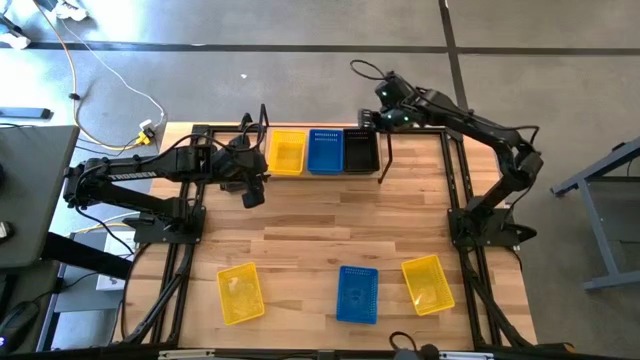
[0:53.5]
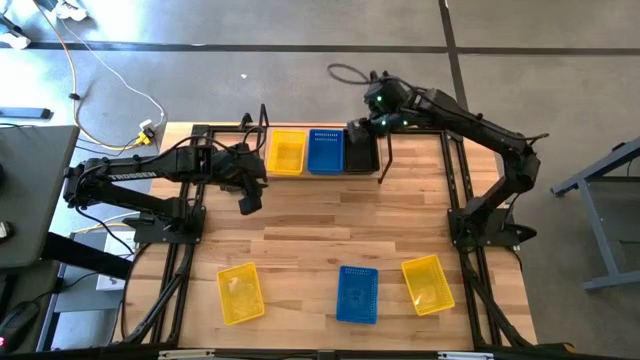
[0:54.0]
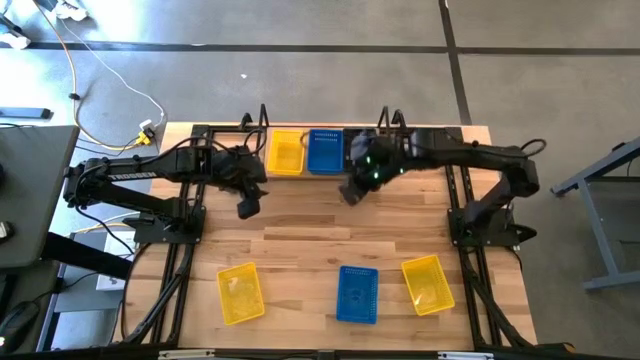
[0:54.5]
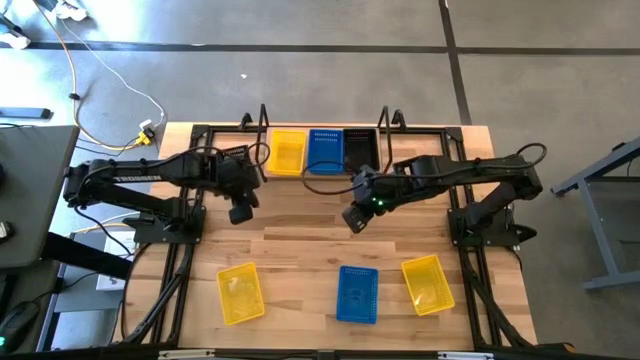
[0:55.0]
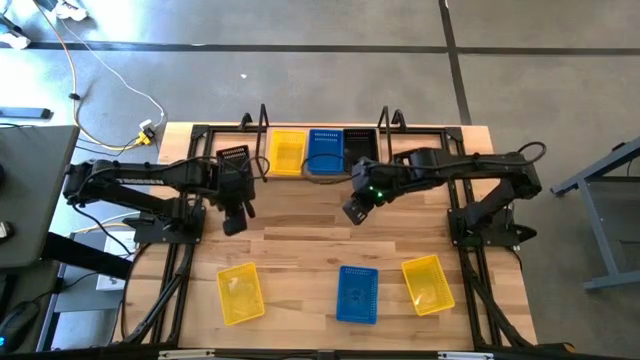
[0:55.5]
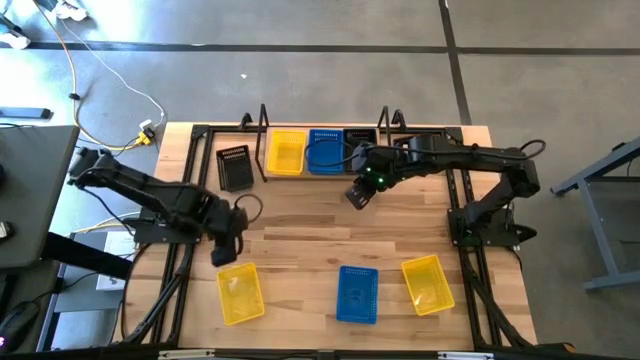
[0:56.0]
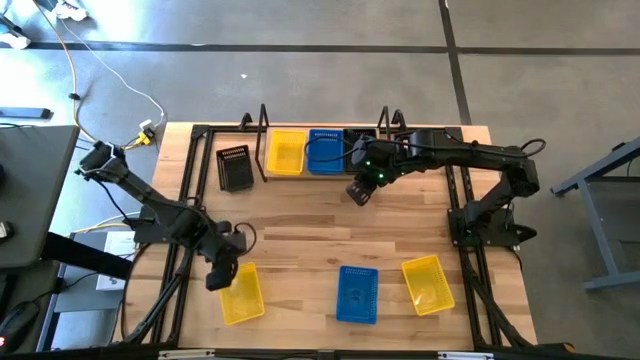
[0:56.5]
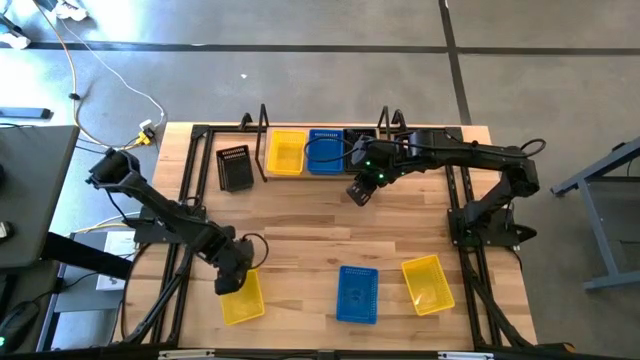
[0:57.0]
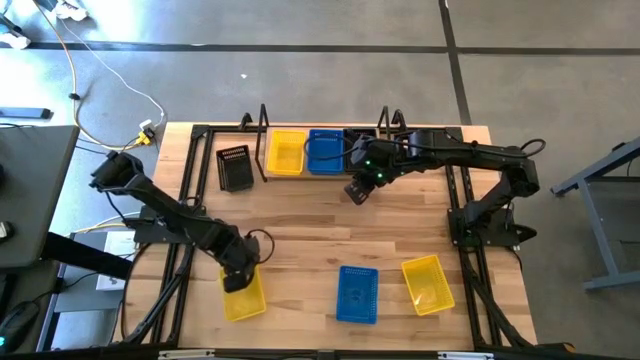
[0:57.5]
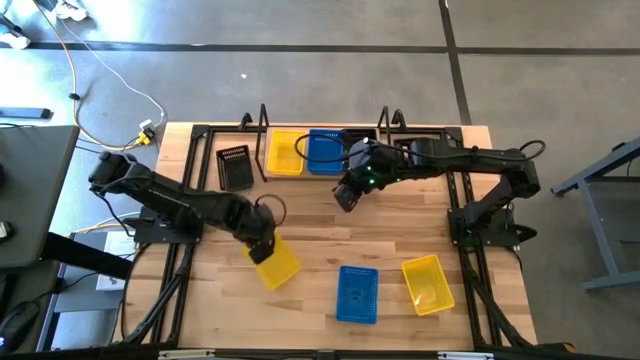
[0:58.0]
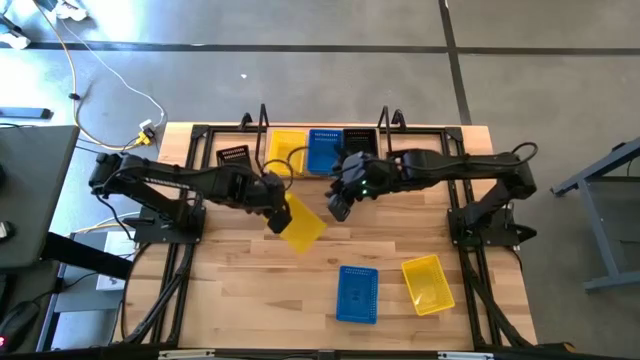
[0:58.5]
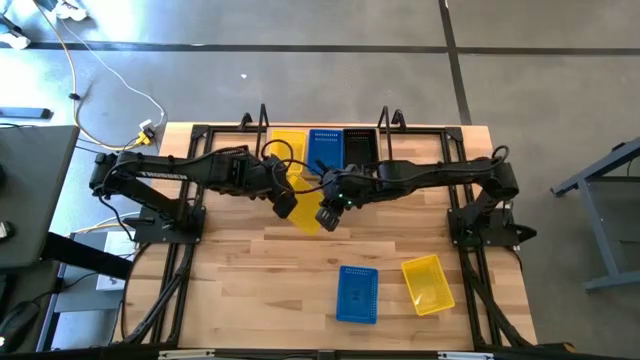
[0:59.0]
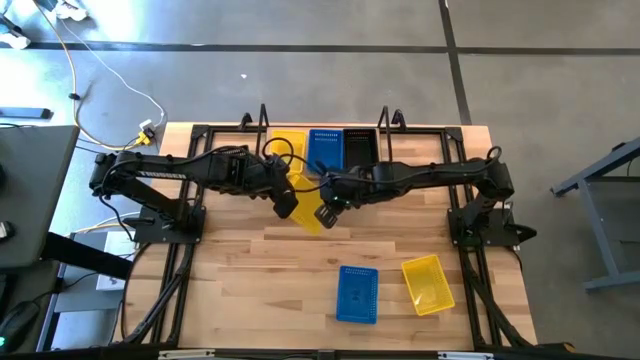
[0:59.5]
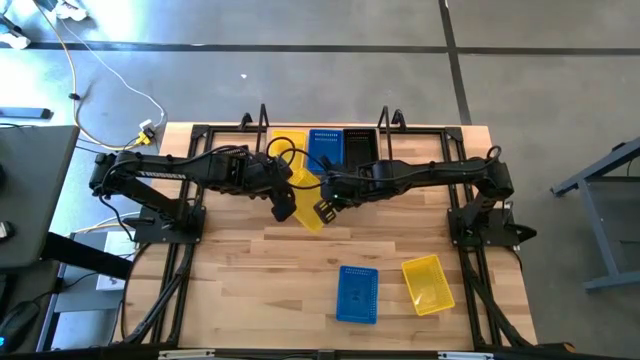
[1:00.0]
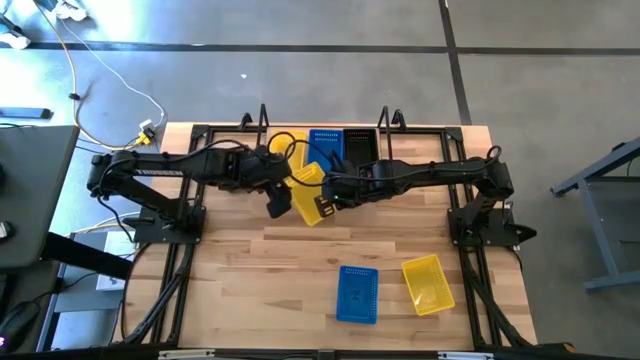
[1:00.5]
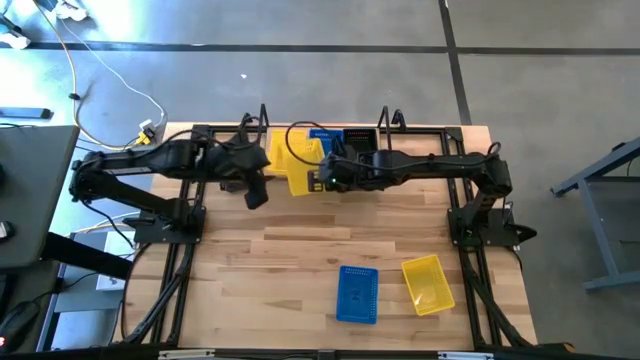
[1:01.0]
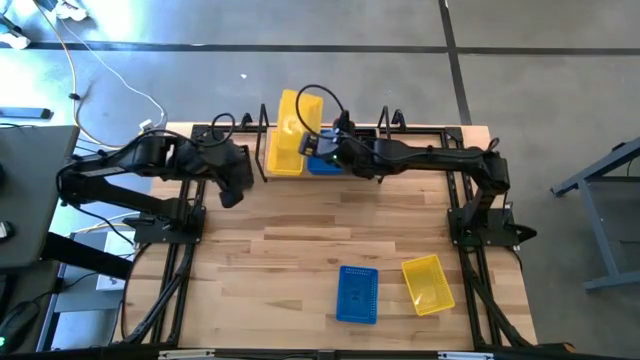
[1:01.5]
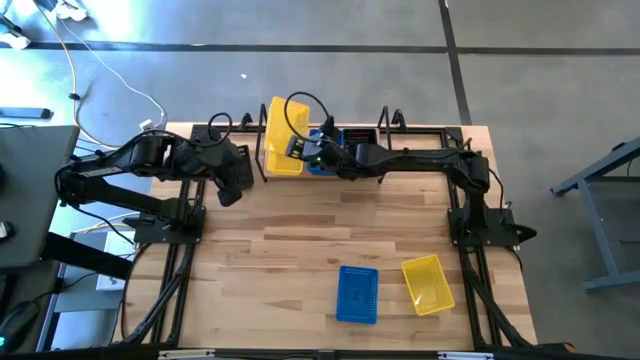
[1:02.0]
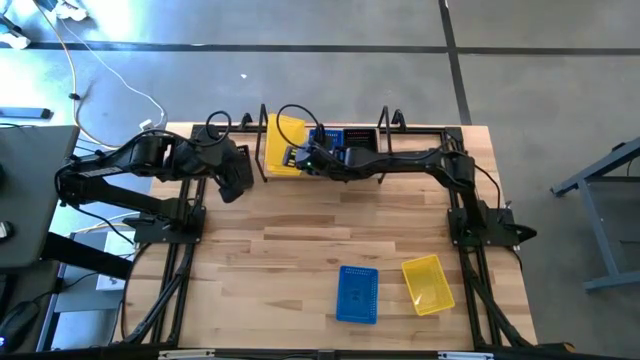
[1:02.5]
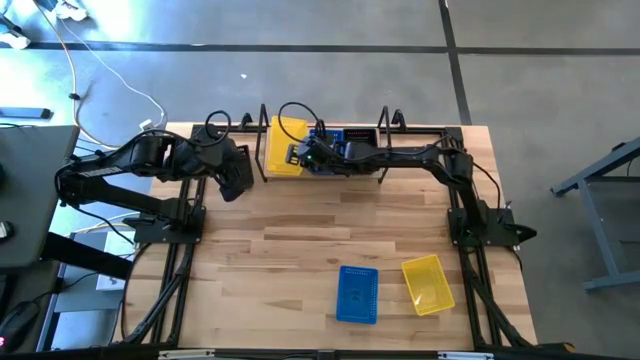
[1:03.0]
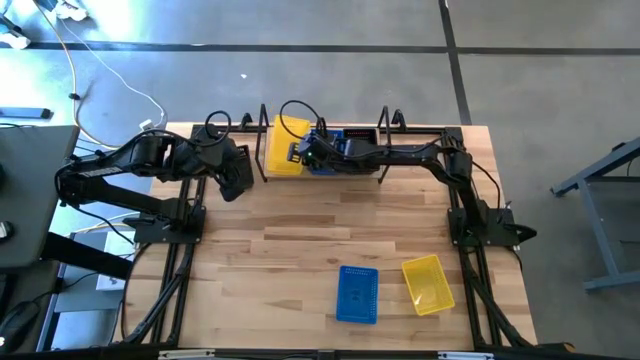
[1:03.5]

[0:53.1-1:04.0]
Task: Stack baskets on shelf by color
Stack the left yellow basket on top of the yellow basket on the shelf

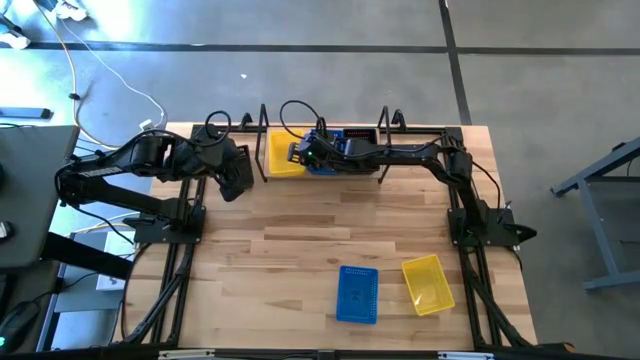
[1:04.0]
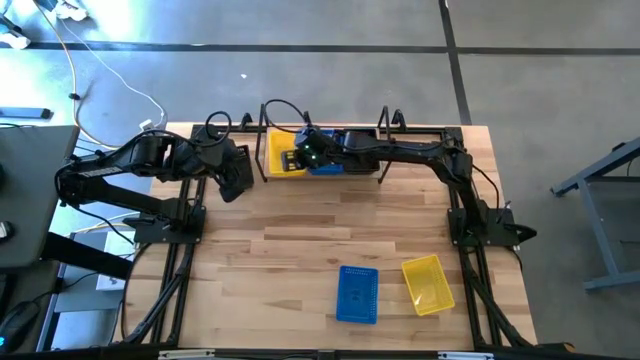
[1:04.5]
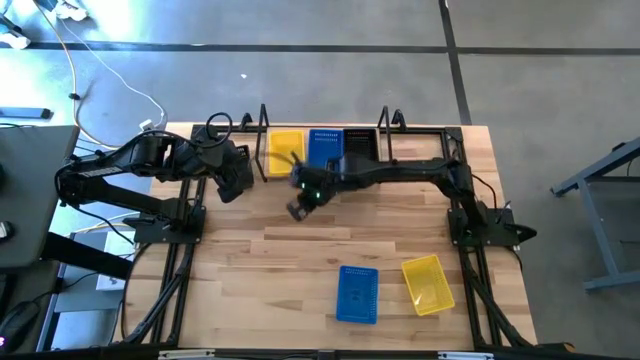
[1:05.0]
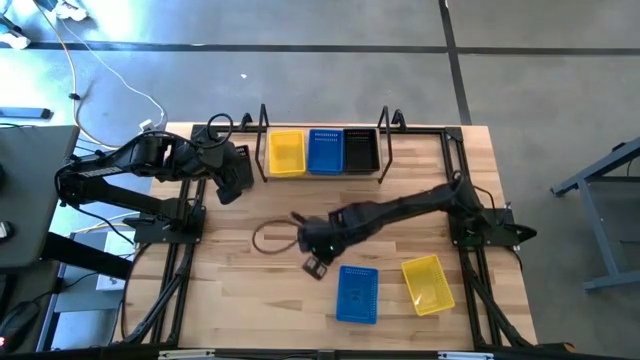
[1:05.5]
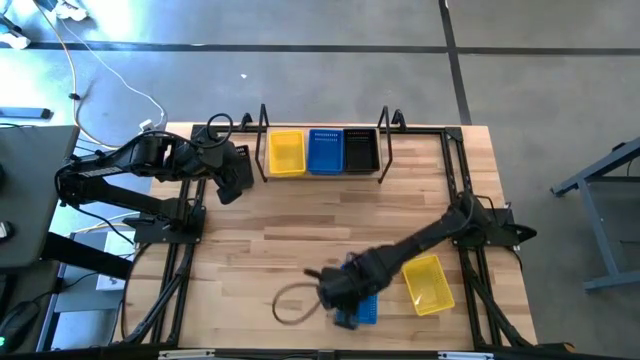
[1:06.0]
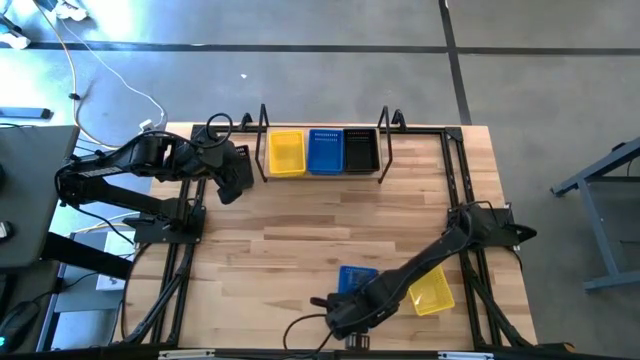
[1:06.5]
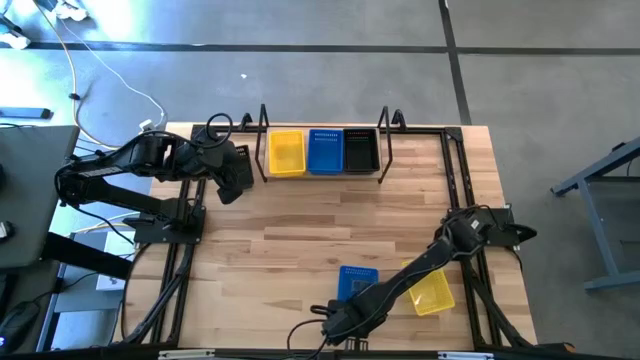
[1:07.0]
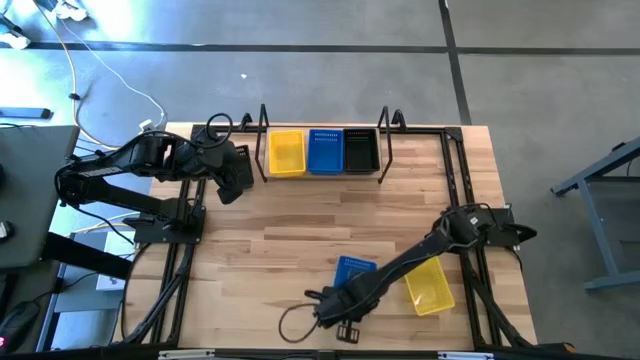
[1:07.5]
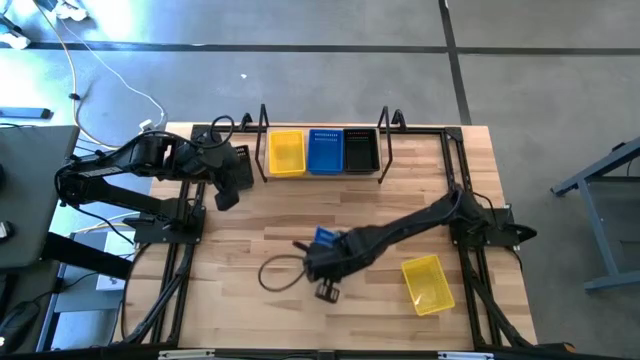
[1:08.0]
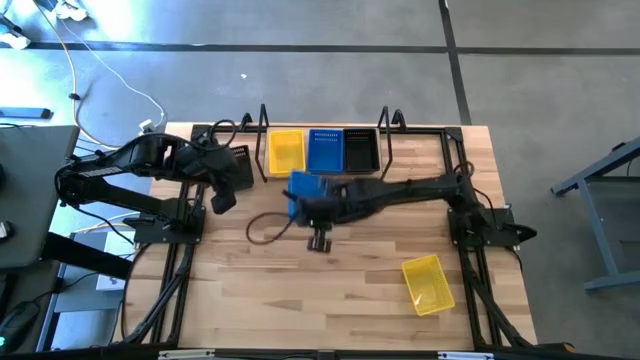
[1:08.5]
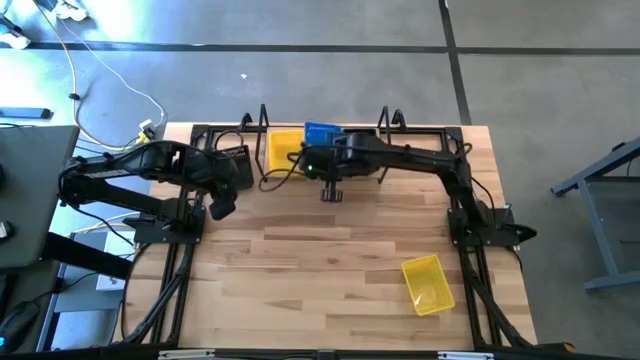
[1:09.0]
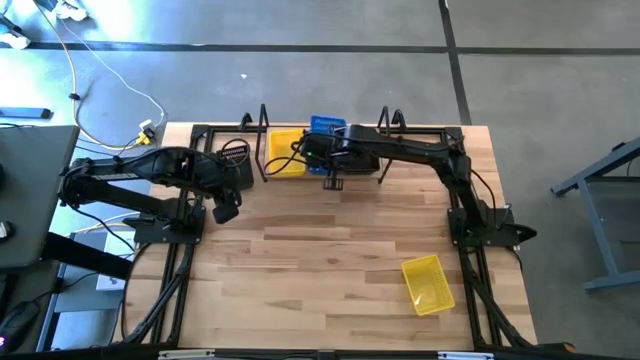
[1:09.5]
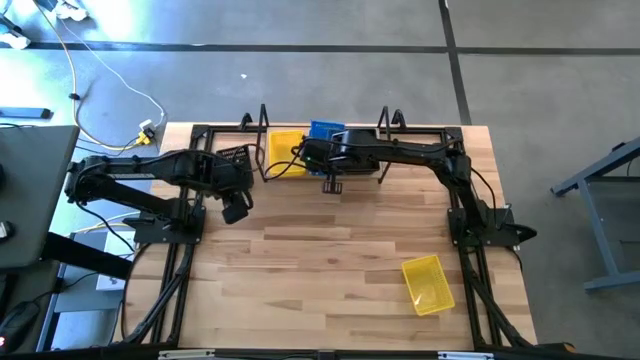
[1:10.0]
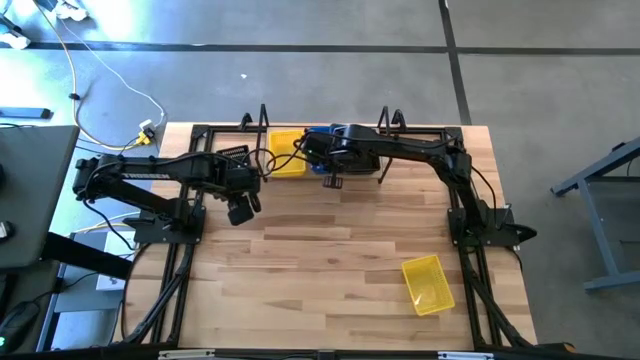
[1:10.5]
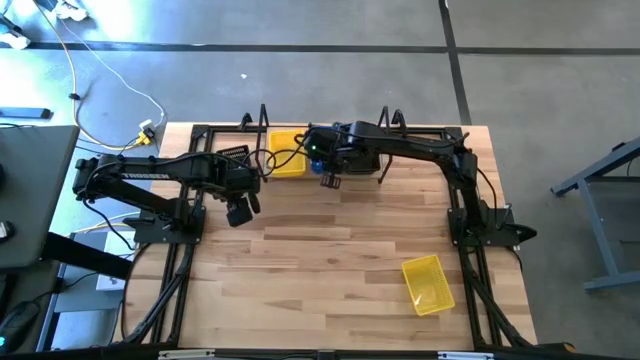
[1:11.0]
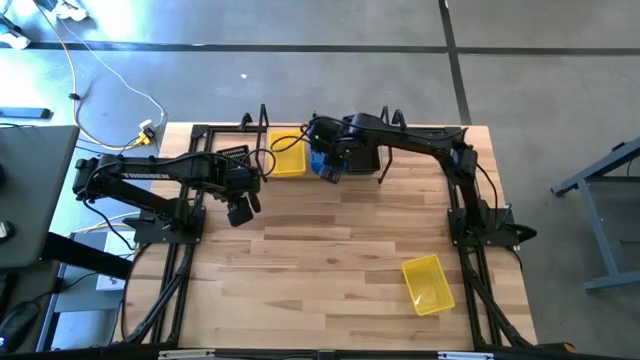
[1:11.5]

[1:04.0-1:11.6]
Stack the blue basket on top of the blue baskets on the shelf

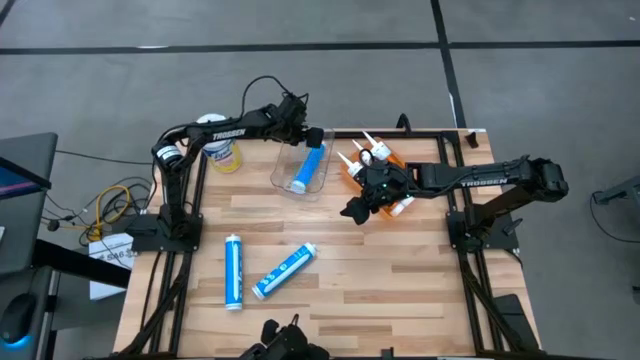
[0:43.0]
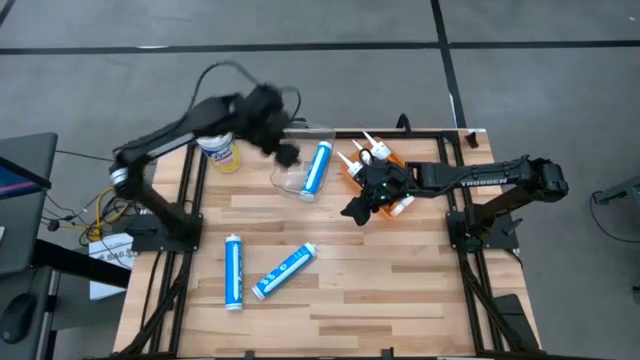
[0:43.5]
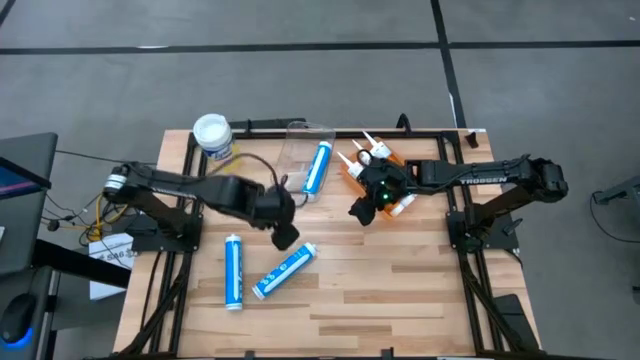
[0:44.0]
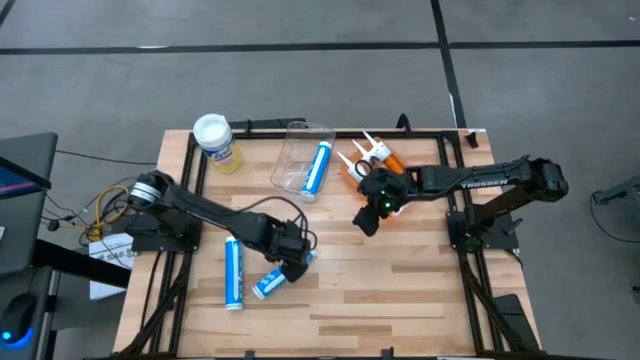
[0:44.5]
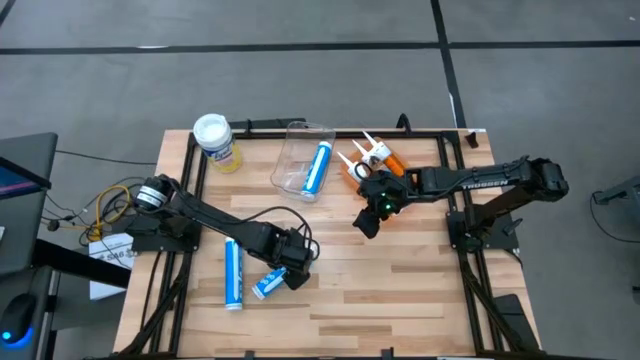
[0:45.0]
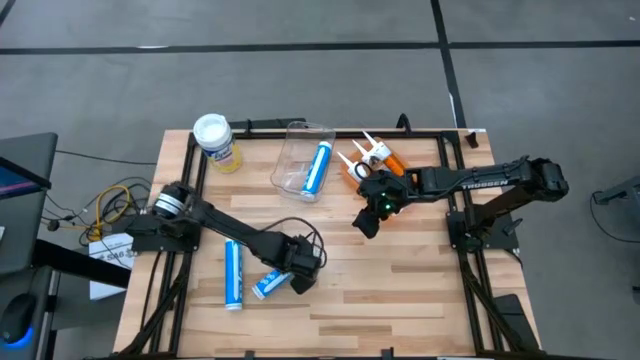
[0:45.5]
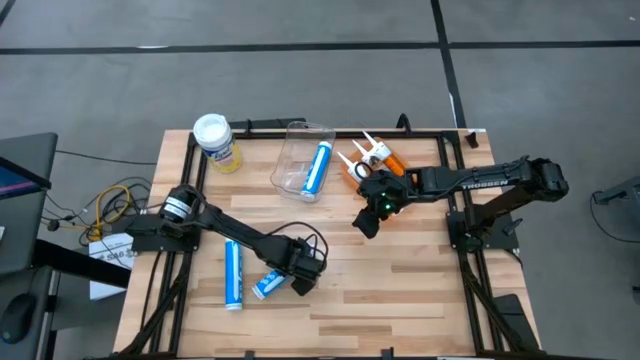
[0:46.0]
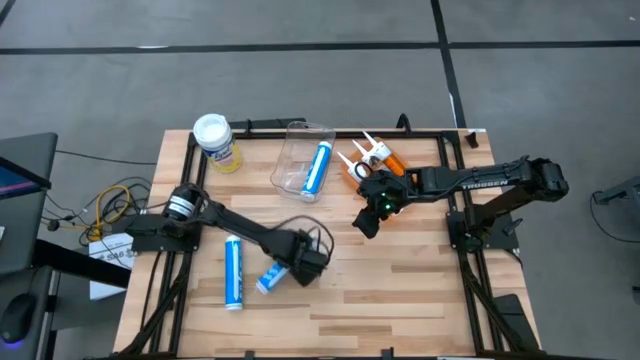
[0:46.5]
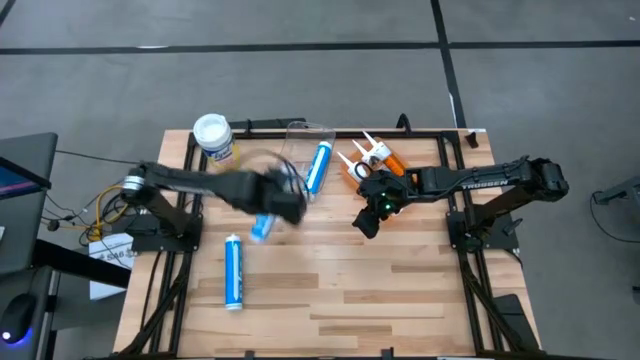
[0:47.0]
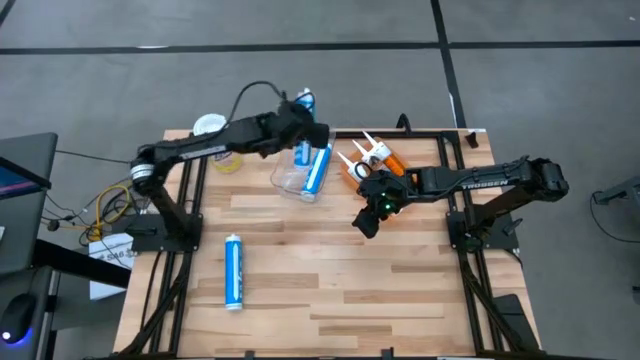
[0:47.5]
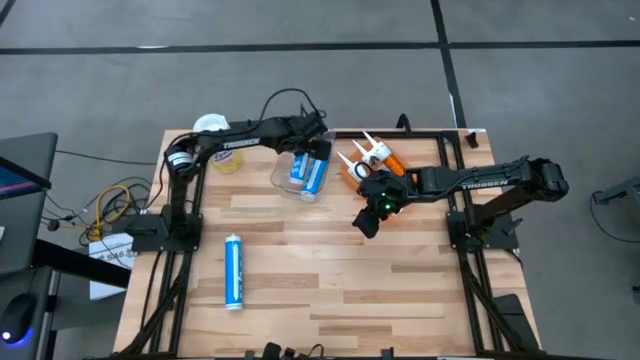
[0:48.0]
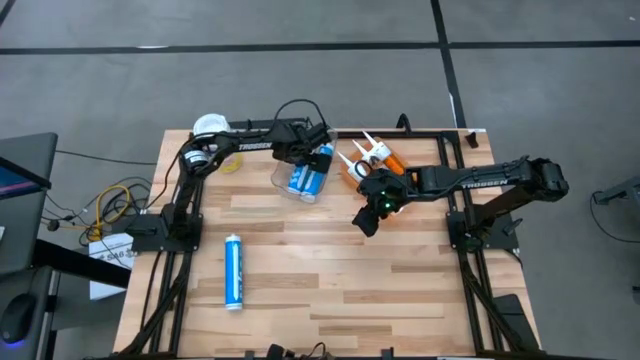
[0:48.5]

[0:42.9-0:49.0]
Task: Pick & place silicon tubes, Sealant and Lysol wipes
Put the right blue sealant into the left transparent bin
